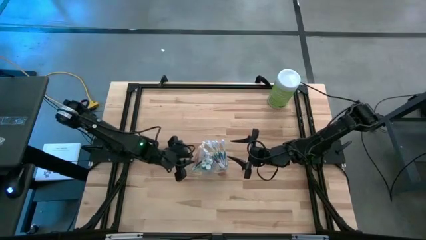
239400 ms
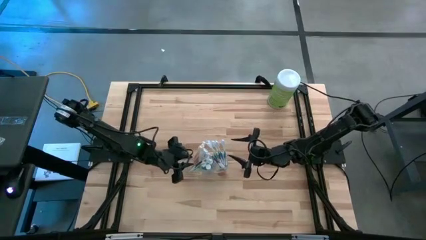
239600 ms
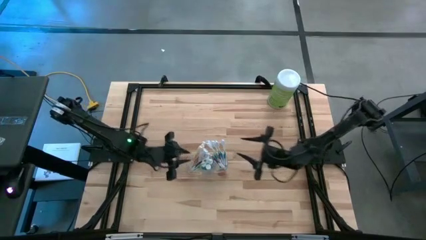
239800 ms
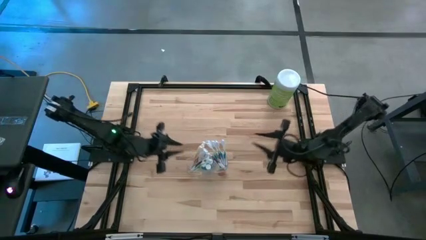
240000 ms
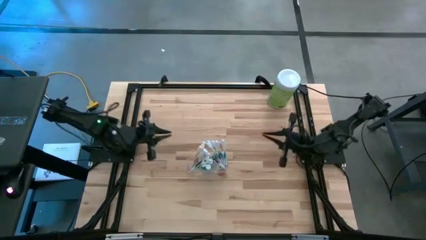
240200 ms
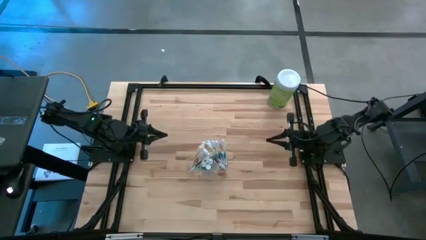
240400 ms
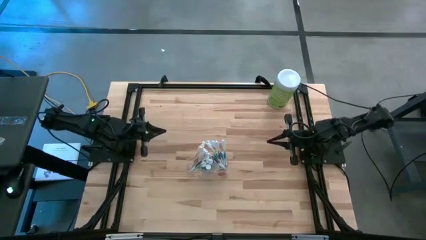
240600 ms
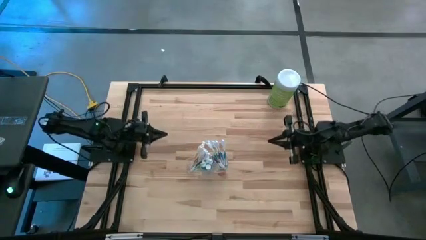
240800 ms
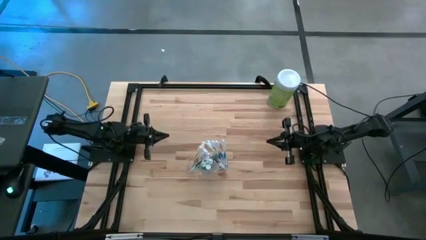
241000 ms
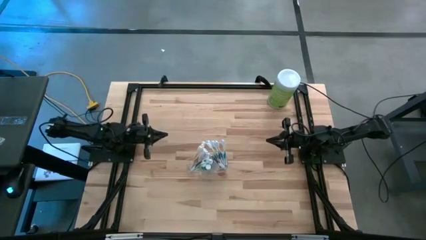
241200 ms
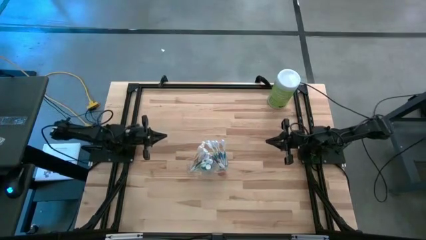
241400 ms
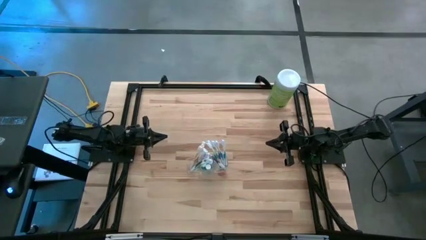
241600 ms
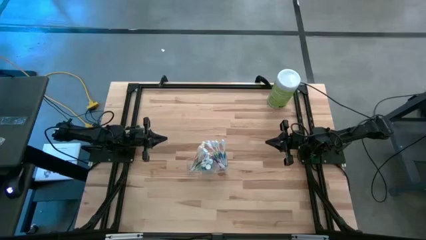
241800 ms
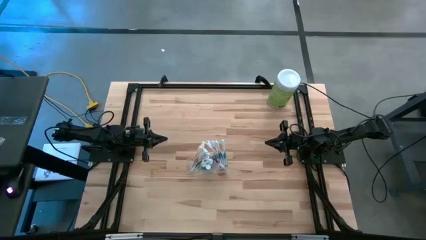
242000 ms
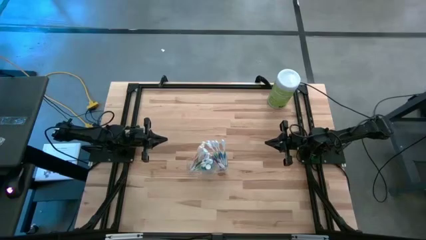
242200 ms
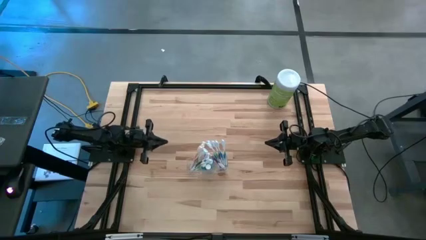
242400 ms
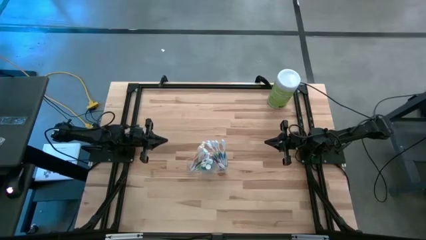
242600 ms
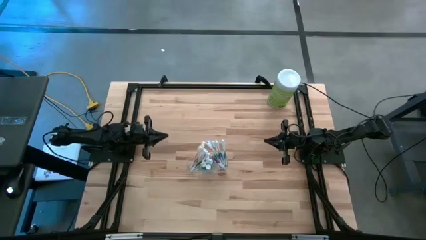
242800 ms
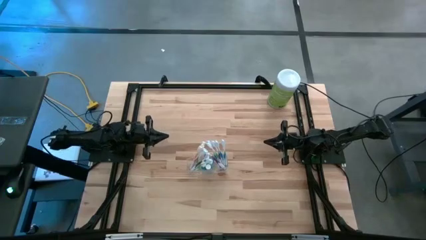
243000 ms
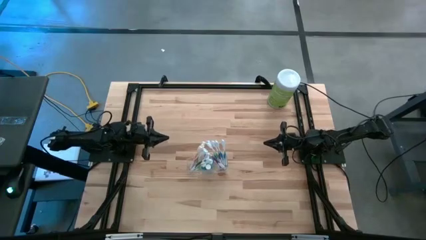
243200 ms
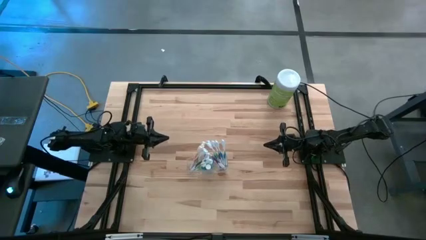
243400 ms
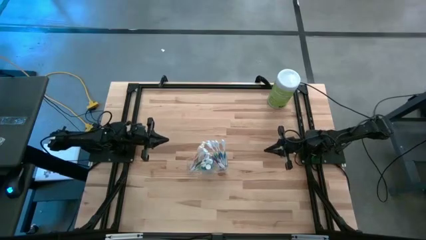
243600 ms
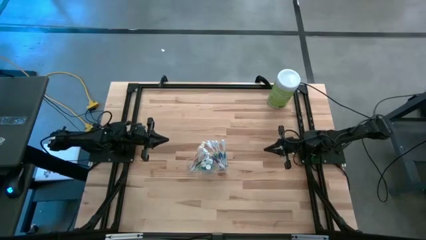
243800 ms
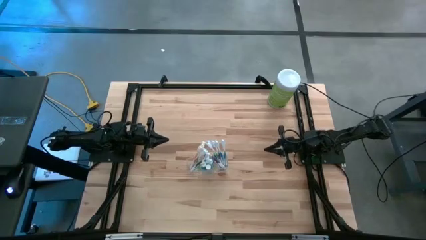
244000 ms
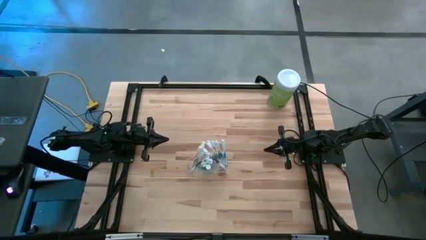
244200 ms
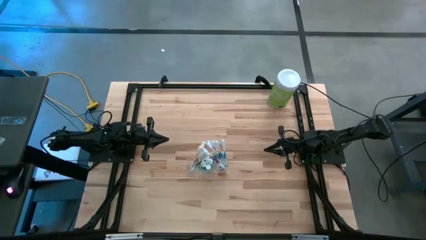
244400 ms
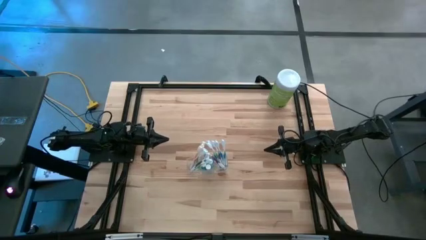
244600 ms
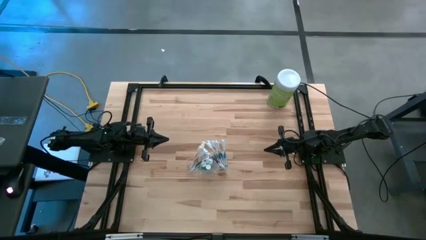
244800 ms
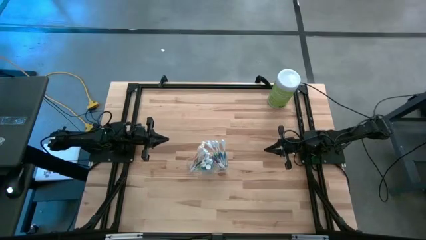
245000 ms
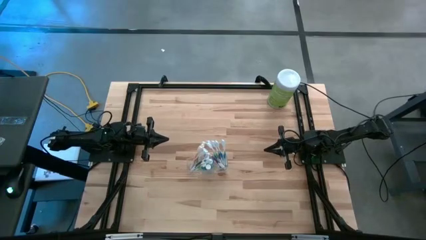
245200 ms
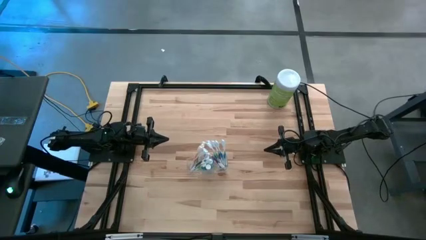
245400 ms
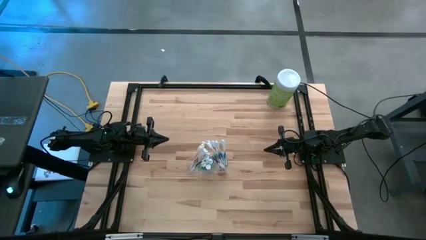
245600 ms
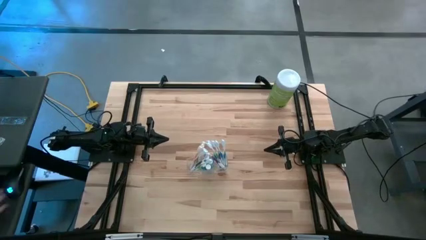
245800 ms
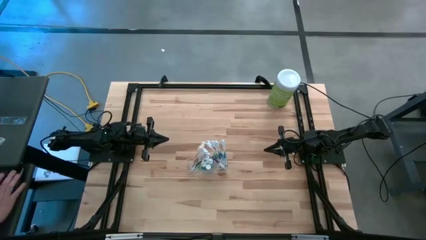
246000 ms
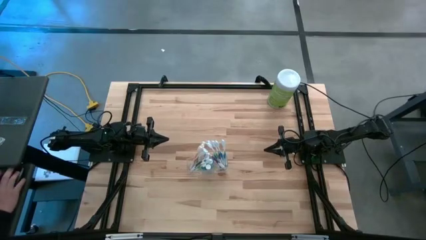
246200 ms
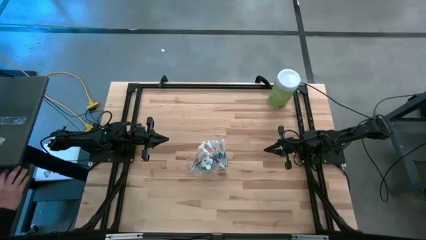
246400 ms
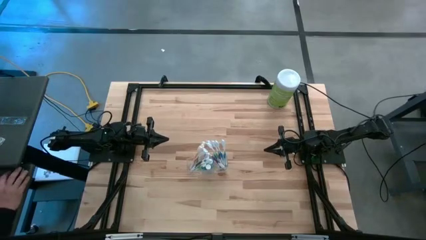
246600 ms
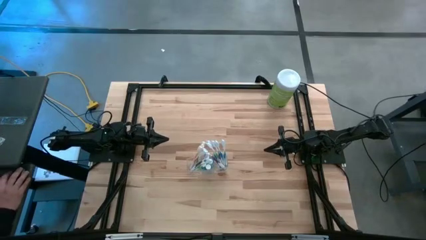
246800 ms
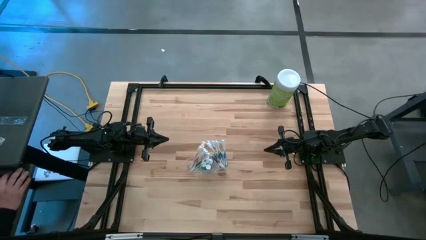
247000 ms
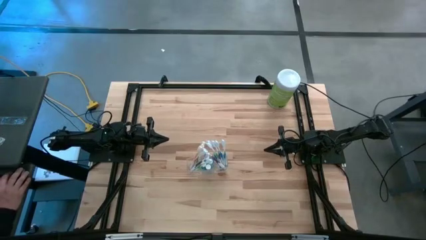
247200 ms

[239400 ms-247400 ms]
Task: Pick & Place toothbrushing station
Return to Home Position

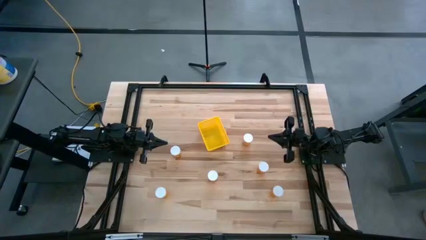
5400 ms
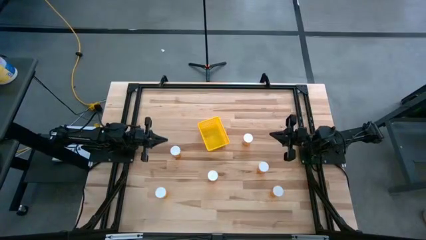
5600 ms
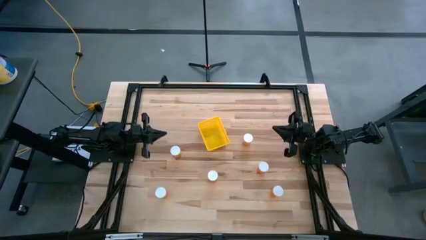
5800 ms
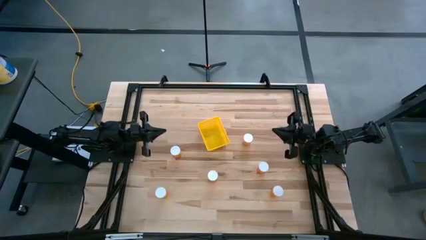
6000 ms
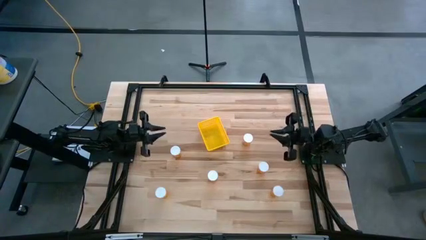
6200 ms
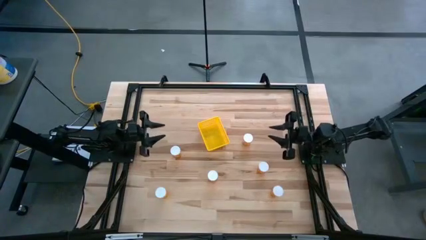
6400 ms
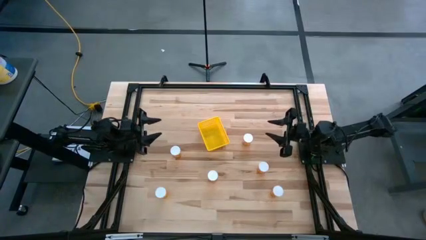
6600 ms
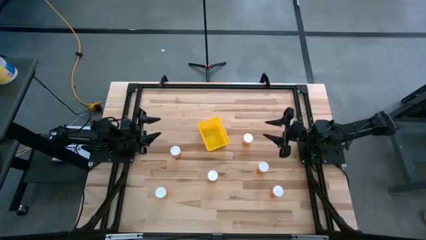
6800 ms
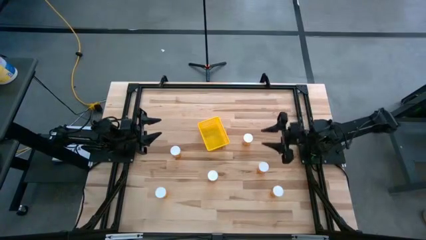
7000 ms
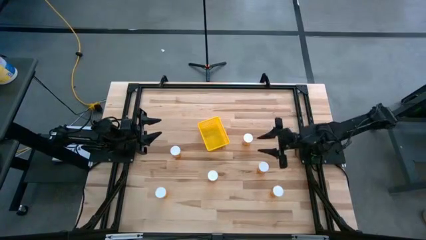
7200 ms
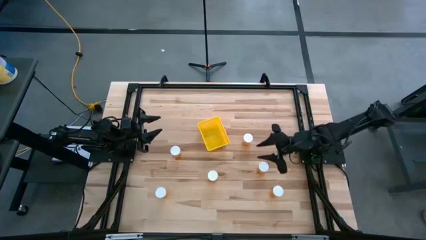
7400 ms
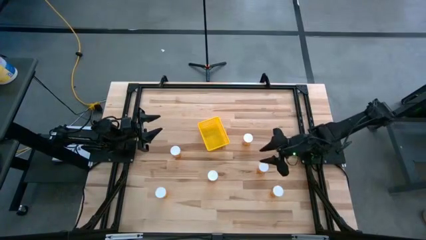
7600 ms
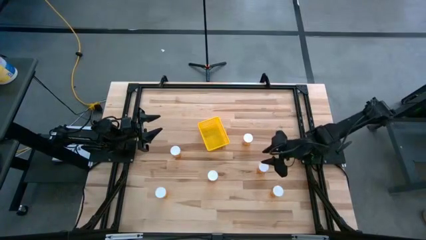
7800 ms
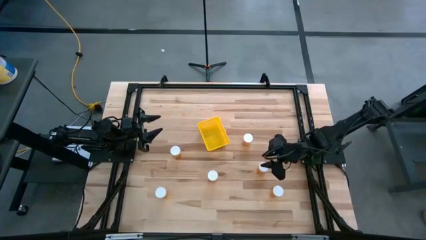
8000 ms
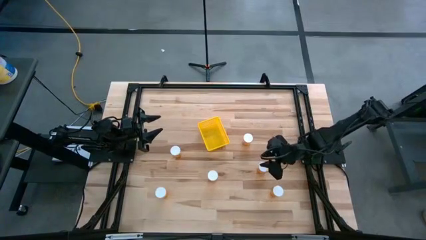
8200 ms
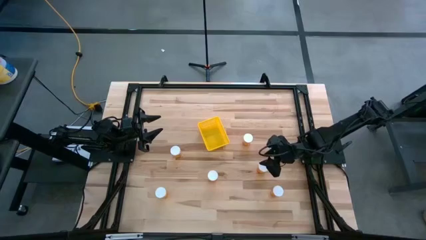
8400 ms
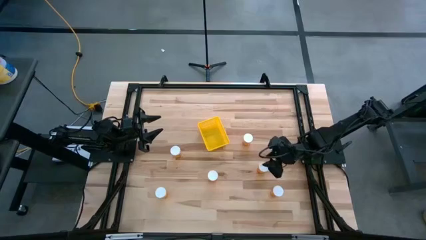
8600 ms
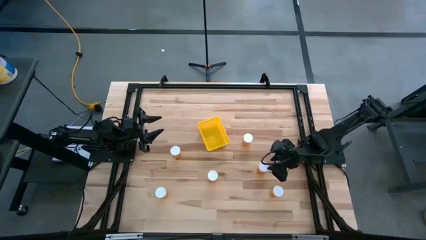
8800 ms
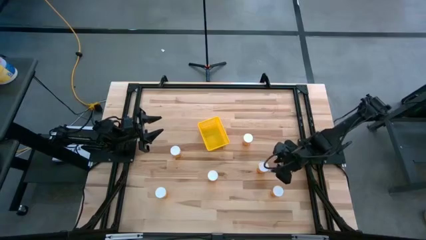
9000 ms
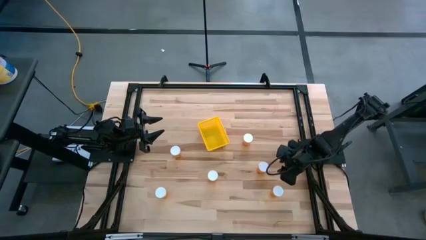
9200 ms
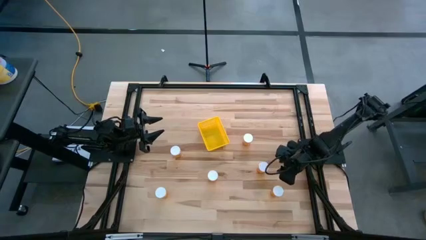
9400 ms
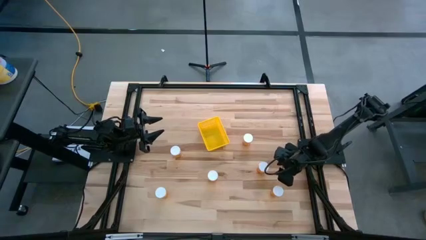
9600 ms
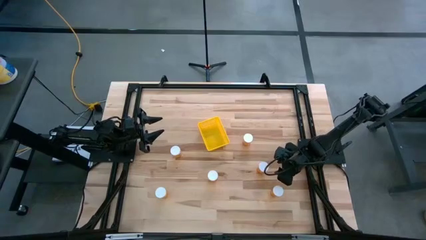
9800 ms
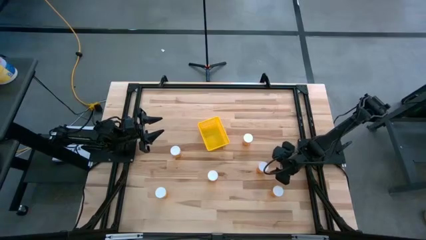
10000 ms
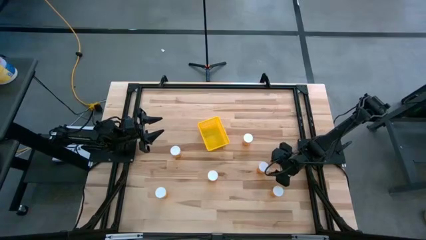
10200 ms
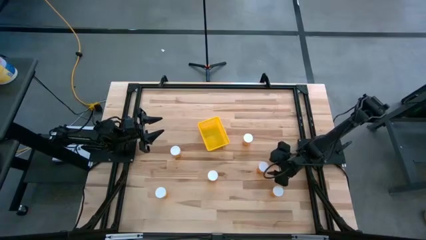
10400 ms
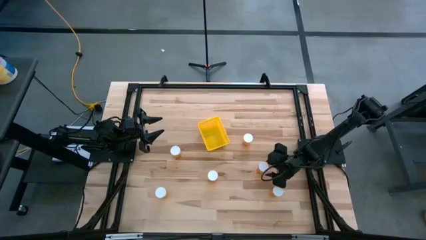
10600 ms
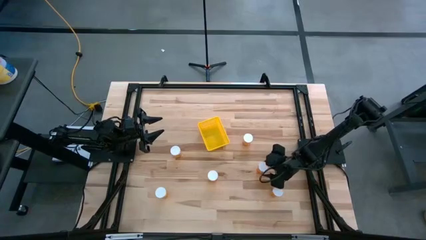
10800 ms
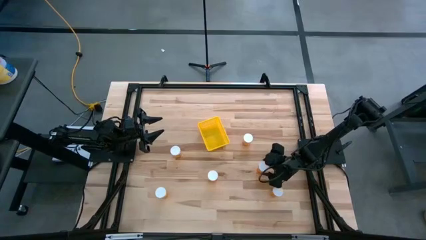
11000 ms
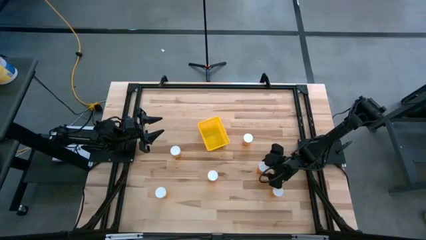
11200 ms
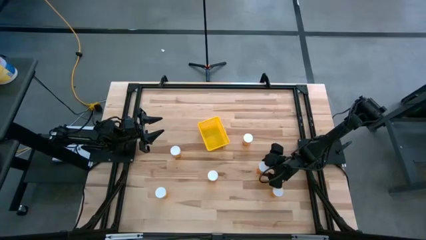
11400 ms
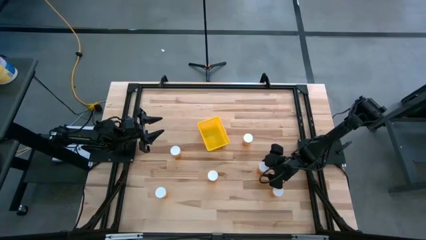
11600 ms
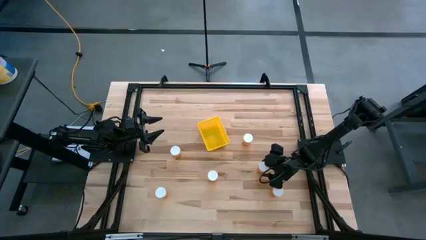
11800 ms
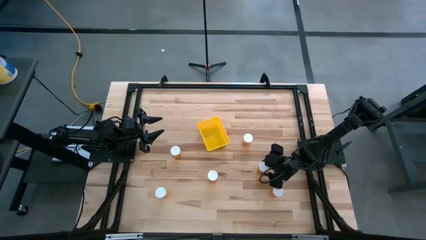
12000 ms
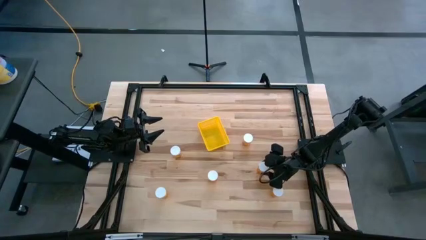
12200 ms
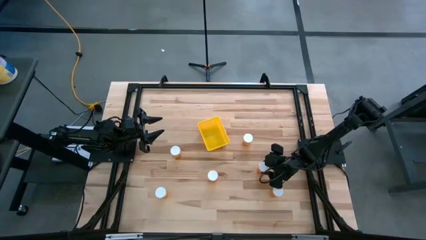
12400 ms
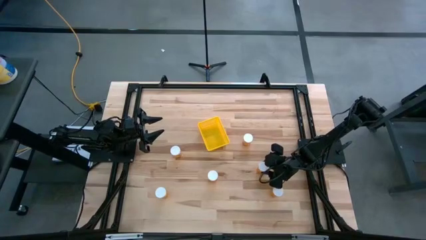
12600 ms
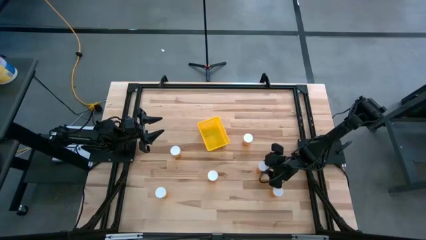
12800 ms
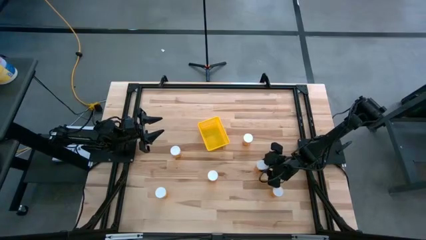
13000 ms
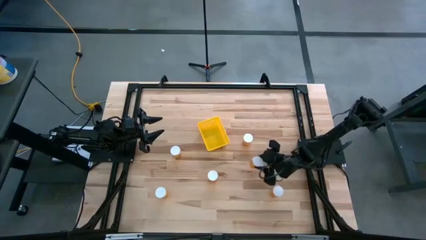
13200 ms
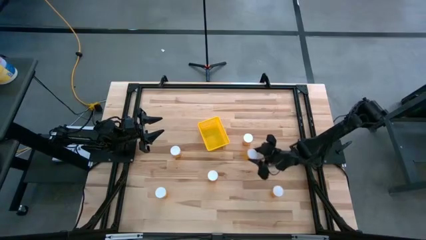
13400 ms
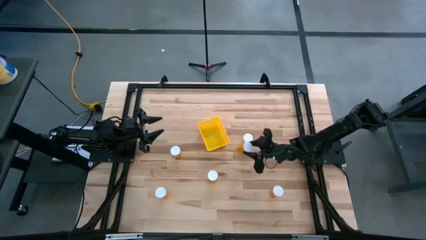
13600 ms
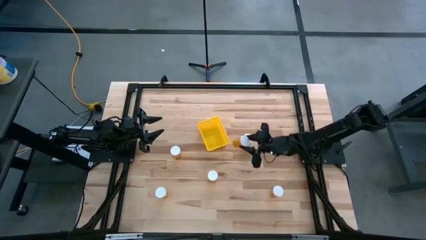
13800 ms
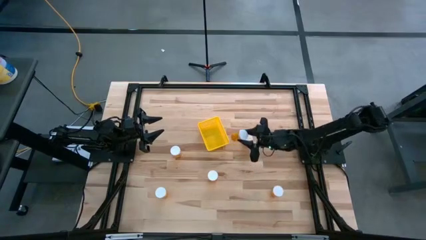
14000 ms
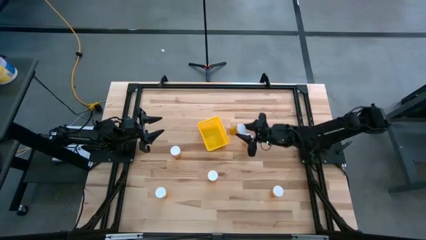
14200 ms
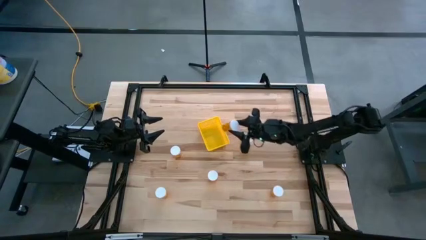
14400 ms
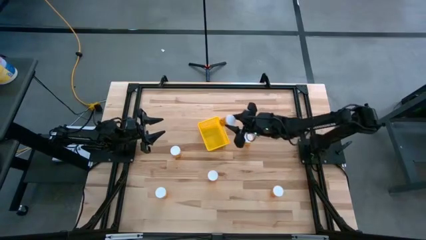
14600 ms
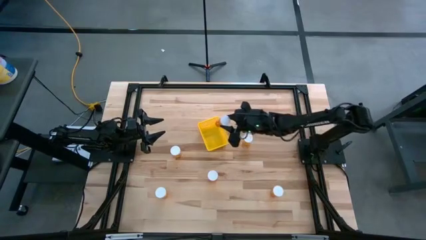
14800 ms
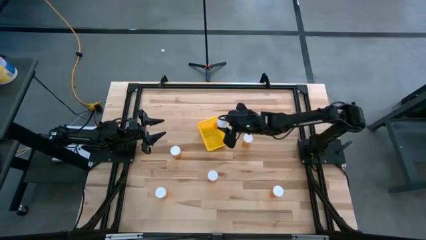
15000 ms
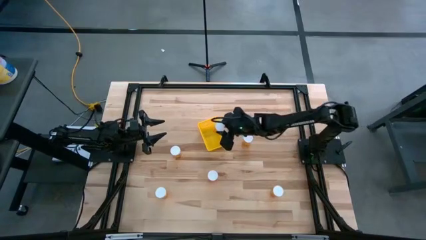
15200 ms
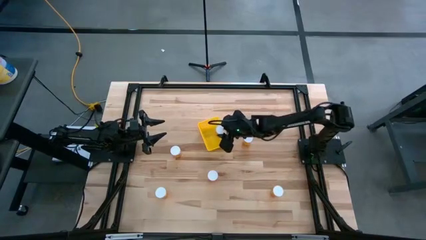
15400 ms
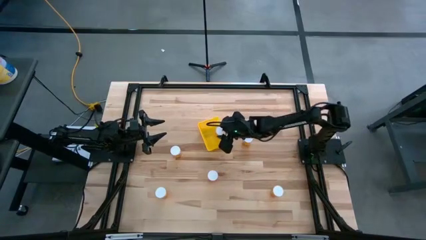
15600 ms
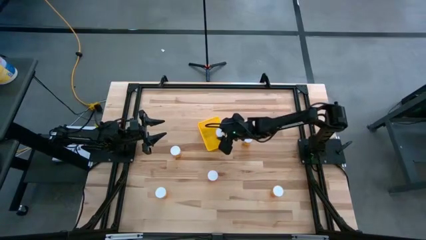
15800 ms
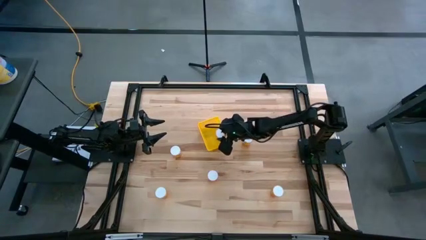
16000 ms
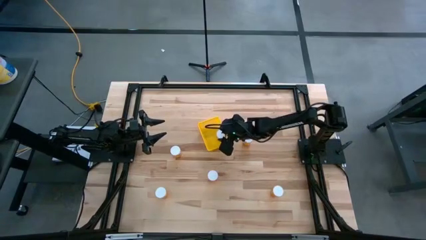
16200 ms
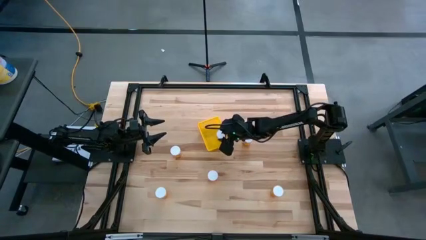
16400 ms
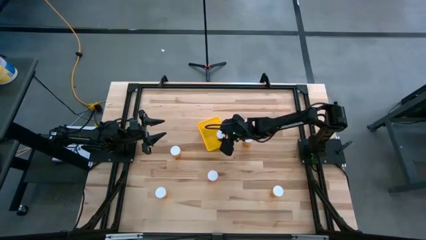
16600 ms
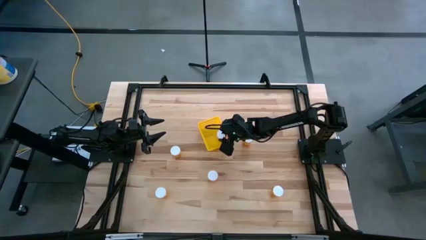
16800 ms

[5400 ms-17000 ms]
Task: Pick and place pill bottles into a basket
Put the orange pill bottle into the yellow bin
